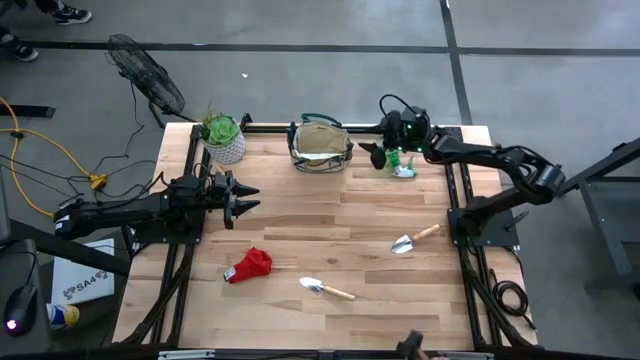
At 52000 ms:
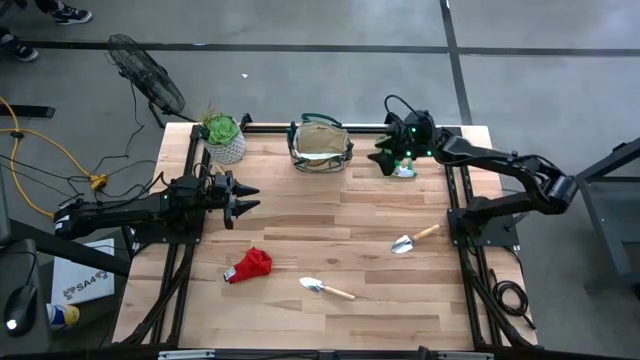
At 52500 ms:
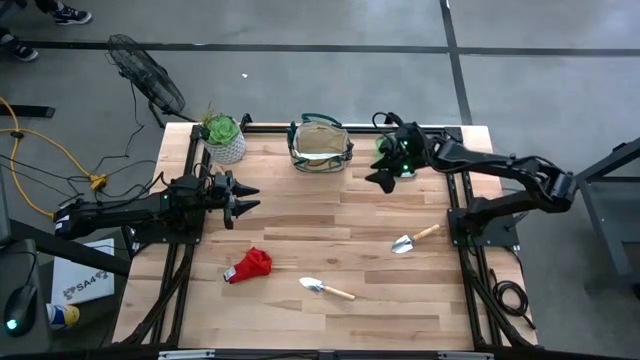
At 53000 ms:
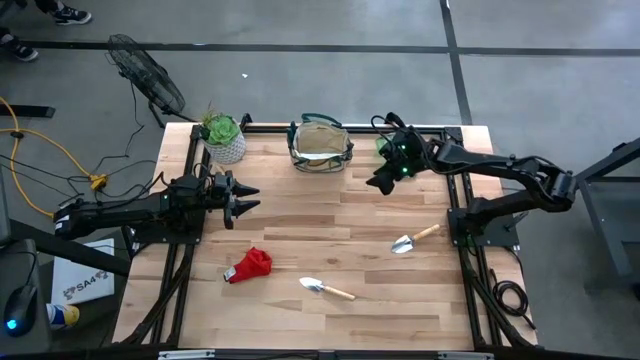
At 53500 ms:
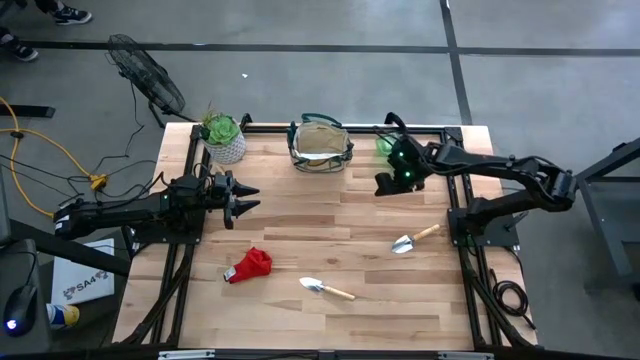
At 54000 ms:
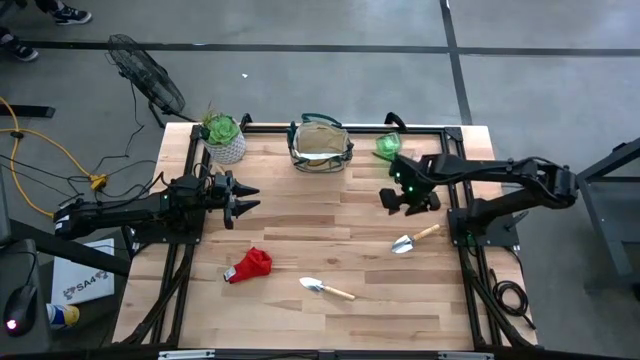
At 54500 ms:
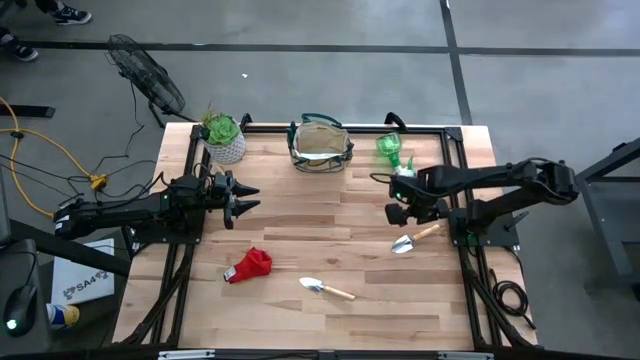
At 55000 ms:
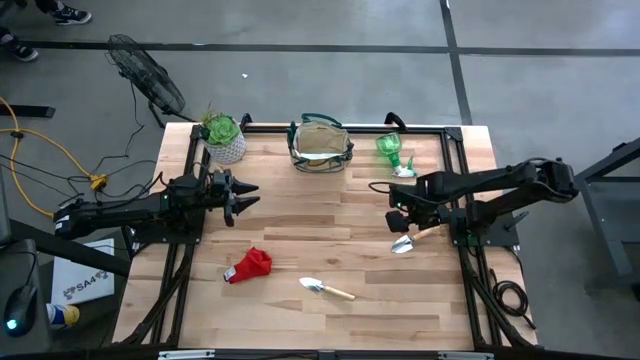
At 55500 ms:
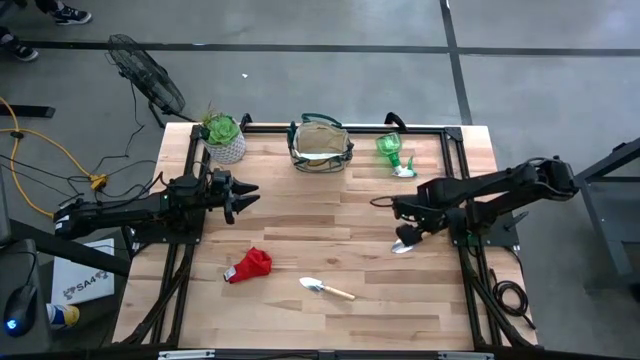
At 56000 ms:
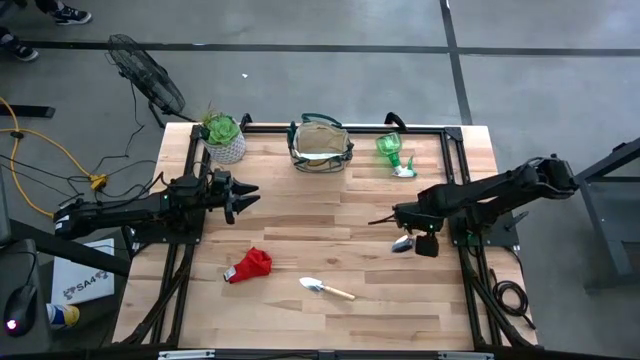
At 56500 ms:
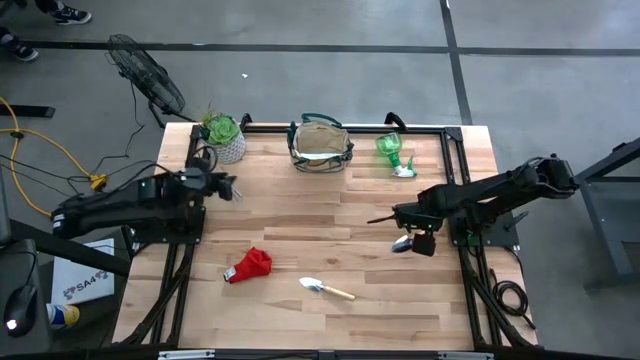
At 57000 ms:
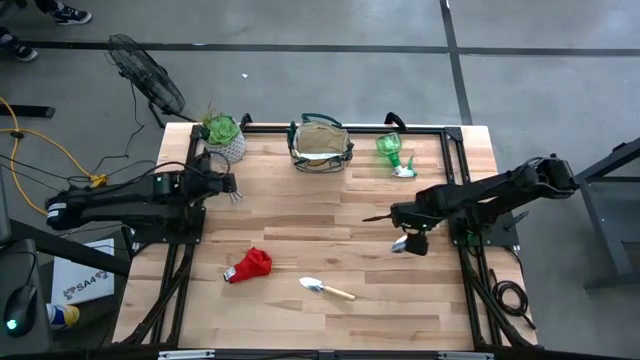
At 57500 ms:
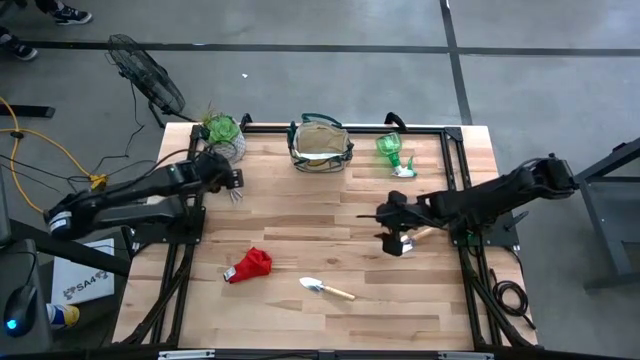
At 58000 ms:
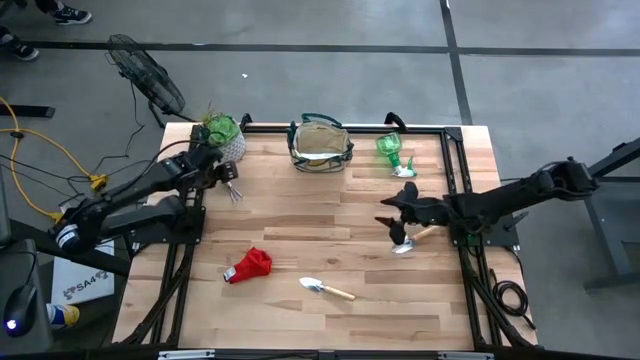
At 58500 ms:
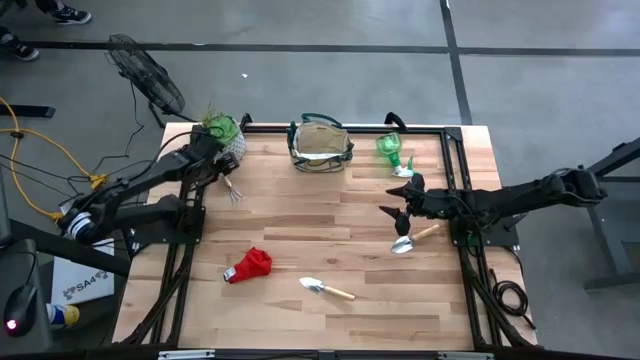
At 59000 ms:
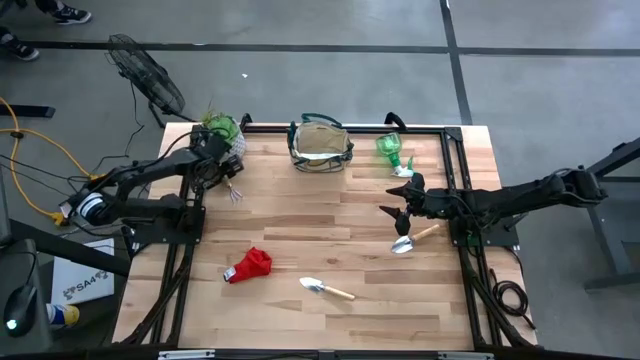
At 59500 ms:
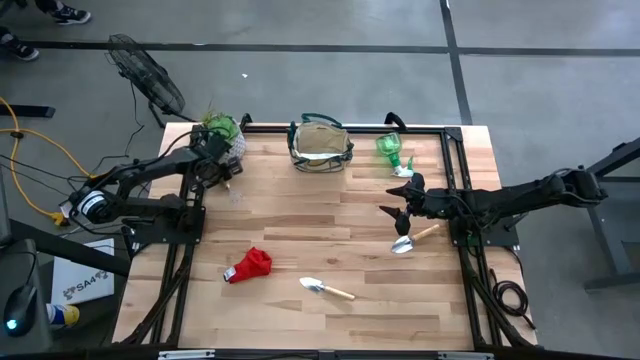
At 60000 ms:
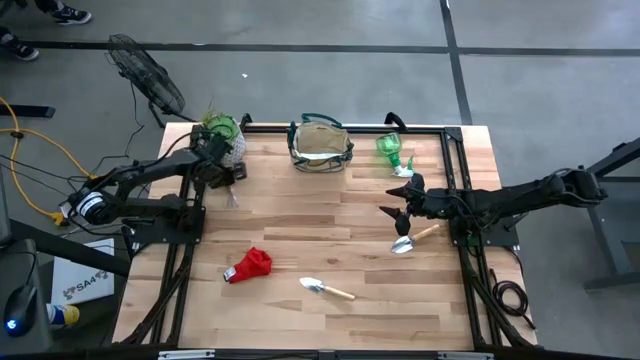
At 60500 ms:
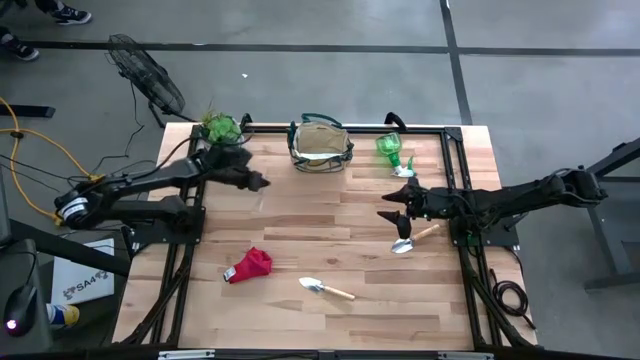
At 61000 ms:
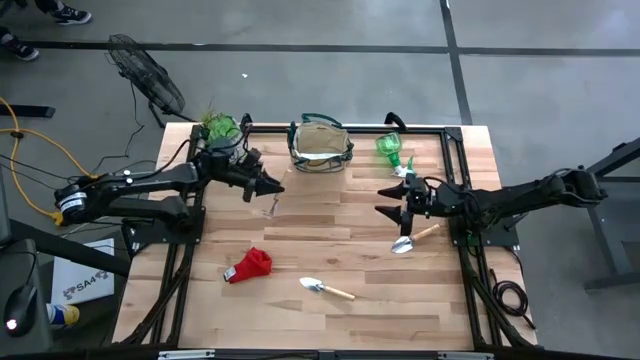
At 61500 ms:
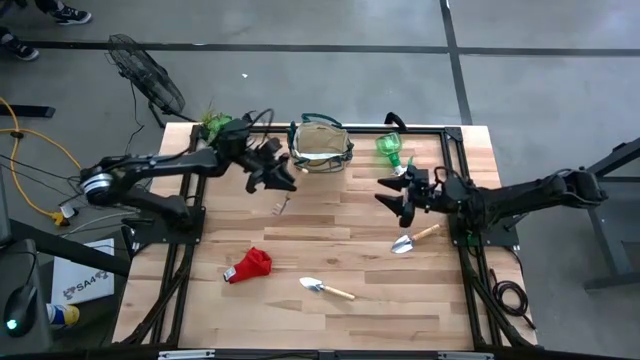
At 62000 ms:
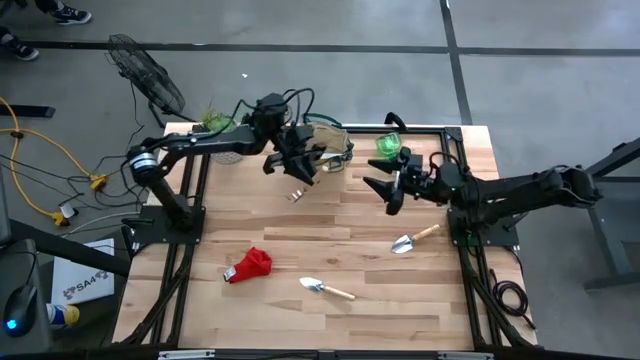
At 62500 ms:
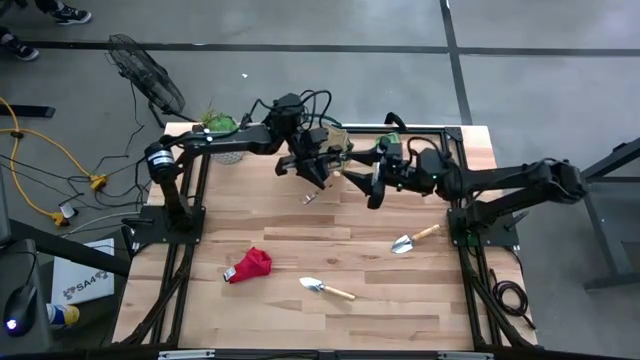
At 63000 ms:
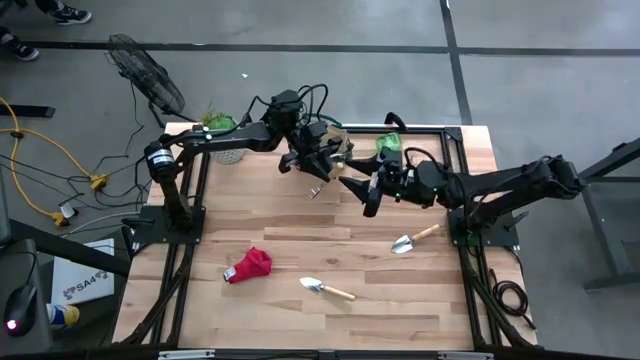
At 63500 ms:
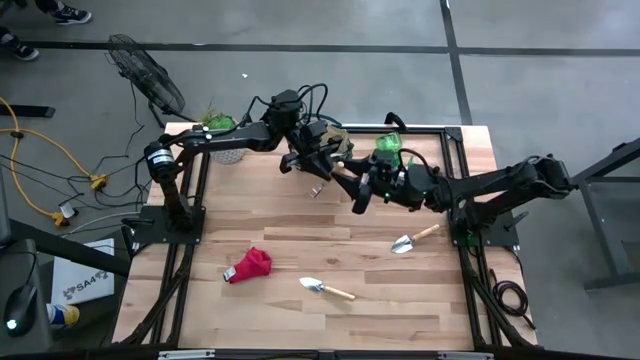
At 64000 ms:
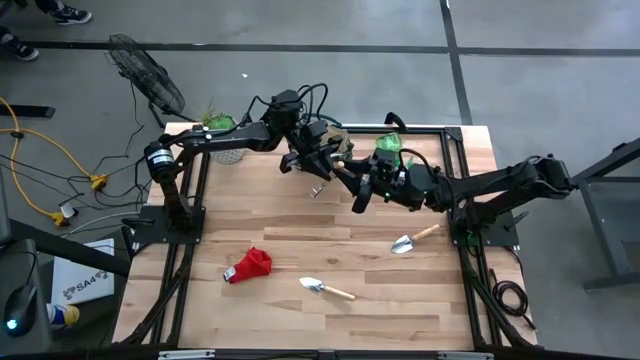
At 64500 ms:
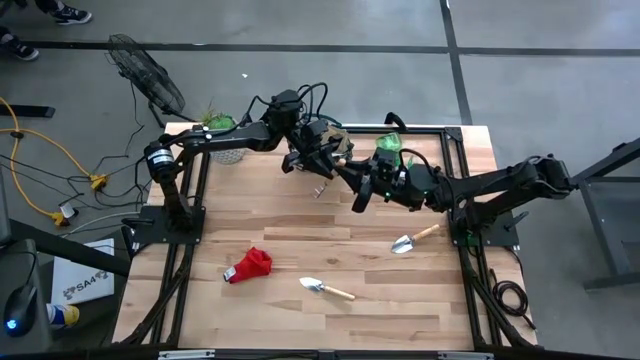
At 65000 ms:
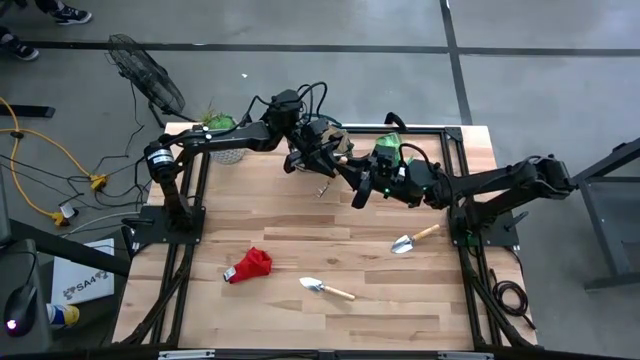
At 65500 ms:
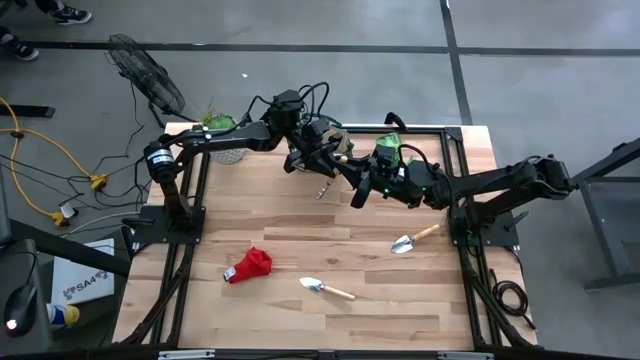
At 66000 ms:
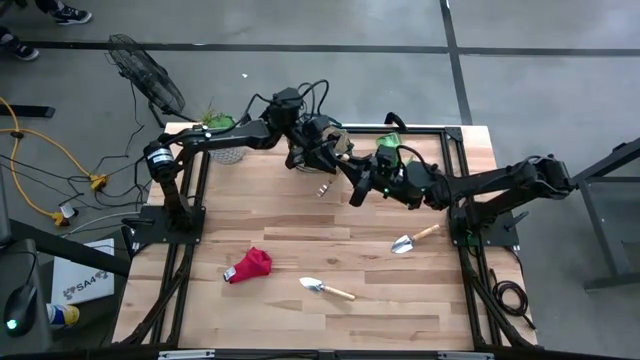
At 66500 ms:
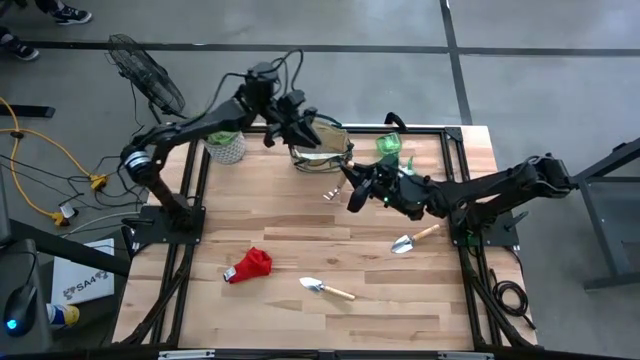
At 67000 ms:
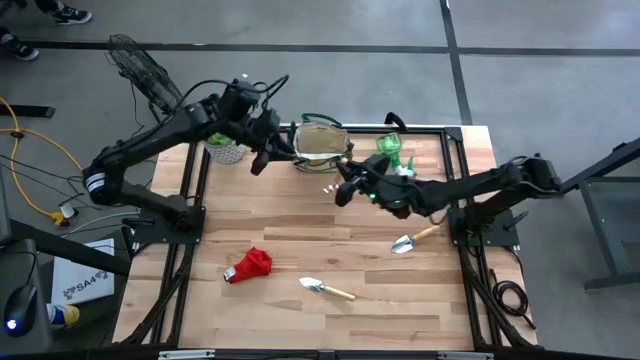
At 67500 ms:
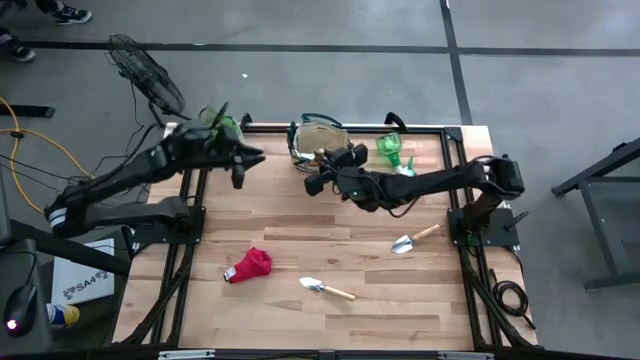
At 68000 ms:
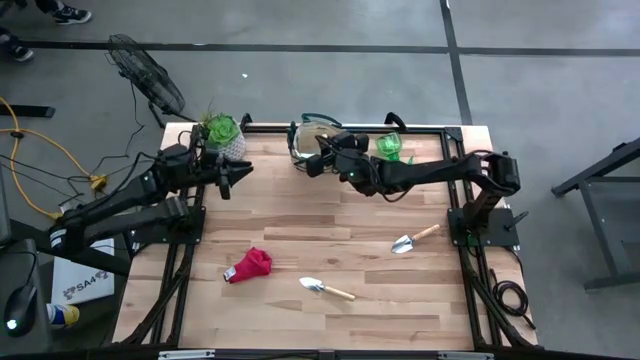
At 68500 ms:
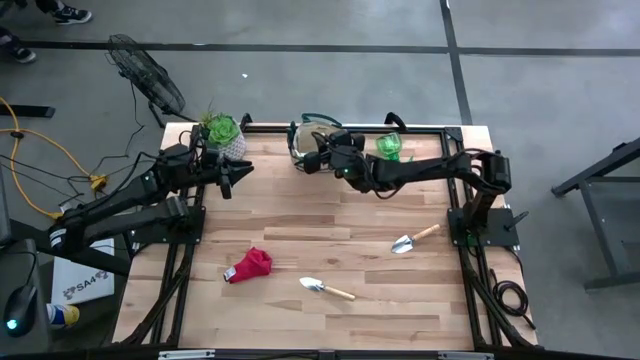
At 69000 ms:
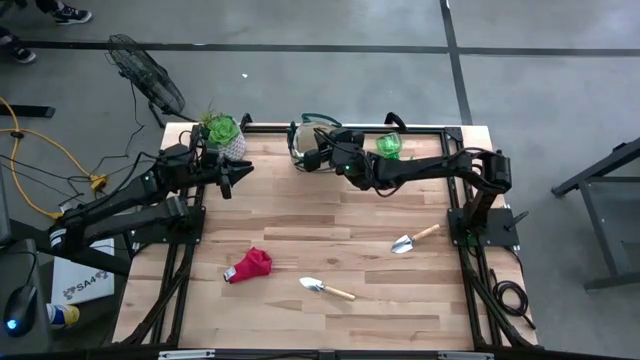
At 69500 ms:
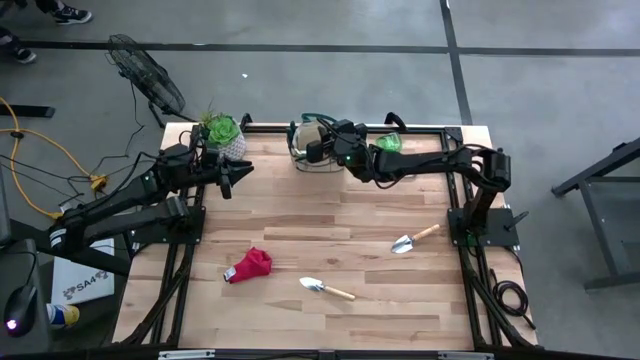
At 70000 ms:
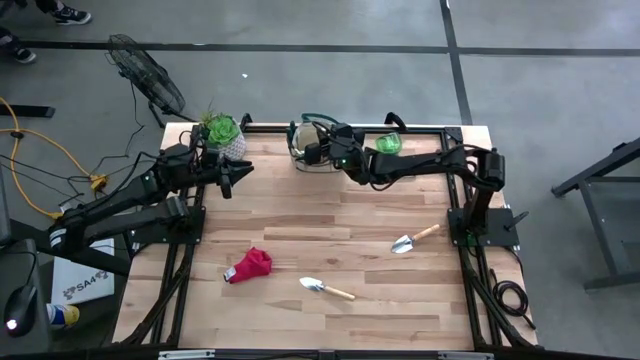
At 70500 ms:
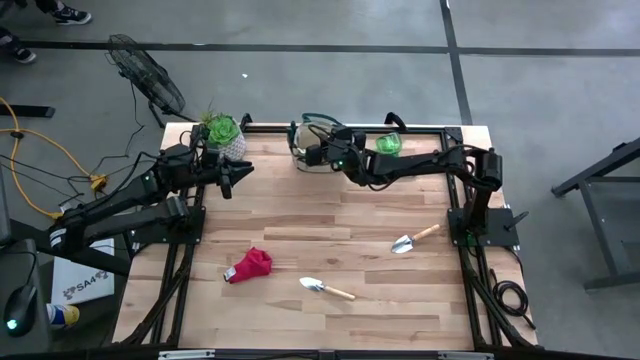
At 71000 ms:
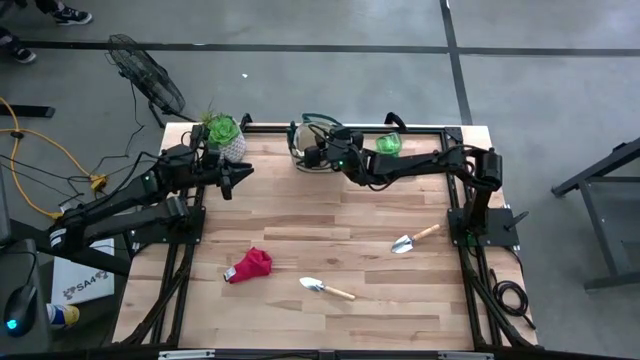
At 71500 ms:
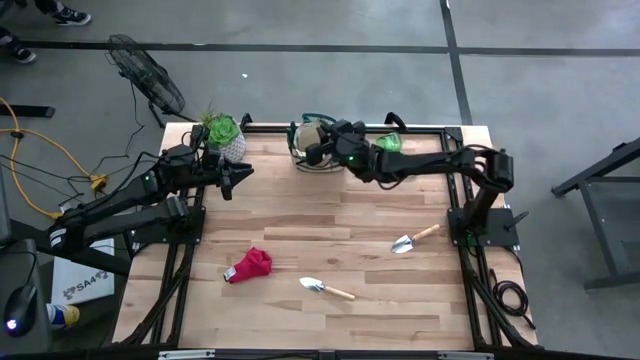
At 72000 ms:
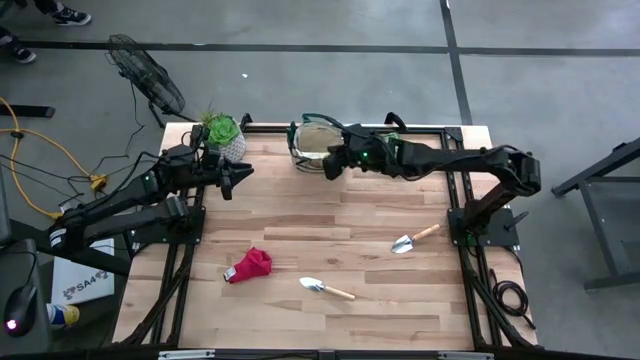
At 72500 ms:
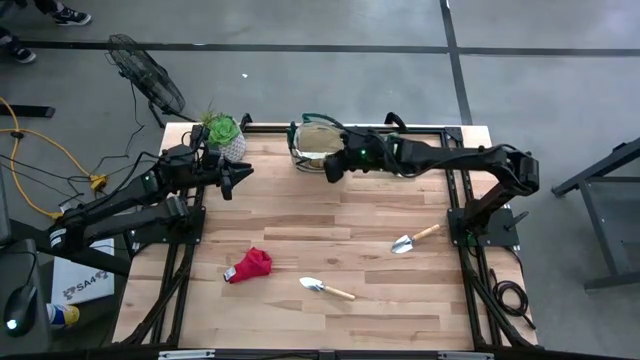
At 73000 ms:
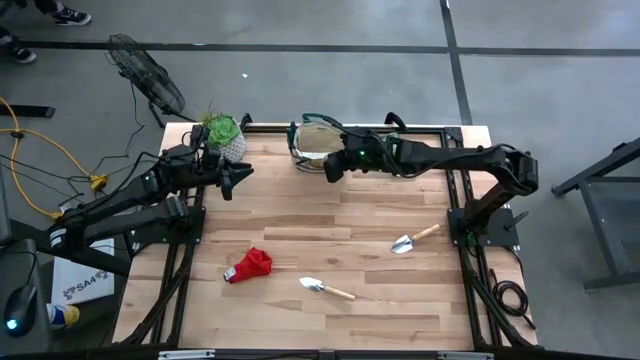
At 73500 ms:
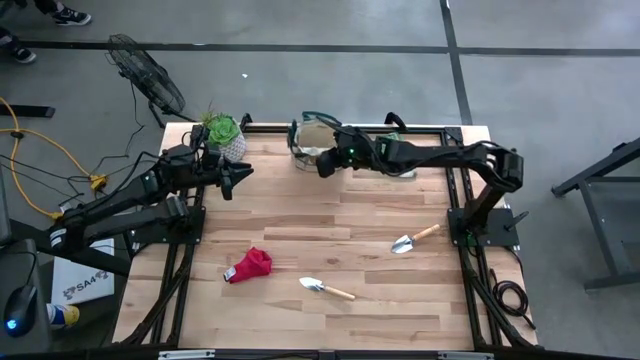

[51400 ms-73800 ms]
Task: Pick & Place Garden tools in Gardening bag
Put the hand rake into the gardening bag
